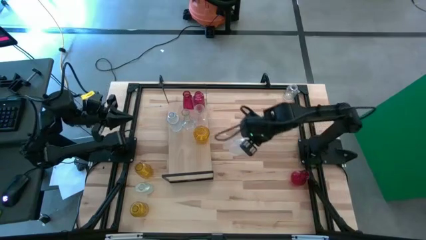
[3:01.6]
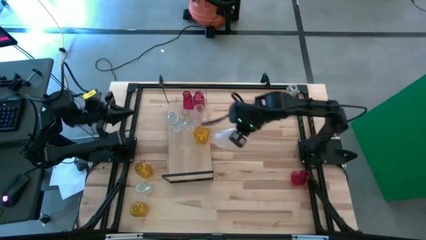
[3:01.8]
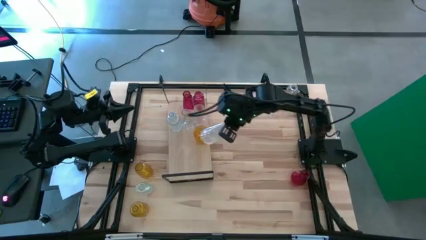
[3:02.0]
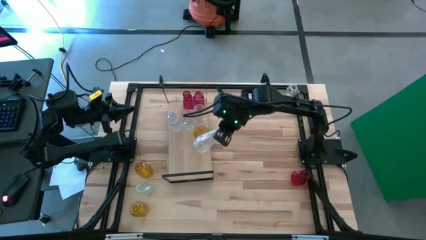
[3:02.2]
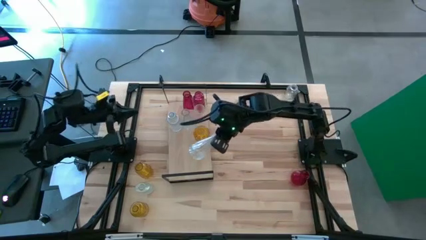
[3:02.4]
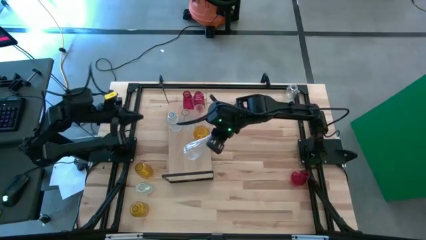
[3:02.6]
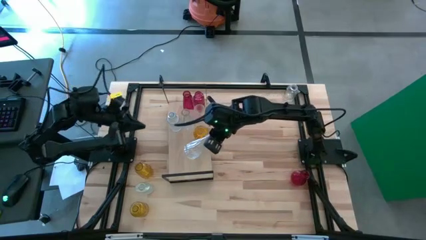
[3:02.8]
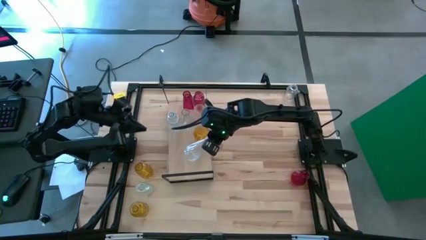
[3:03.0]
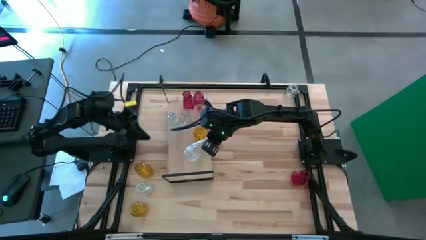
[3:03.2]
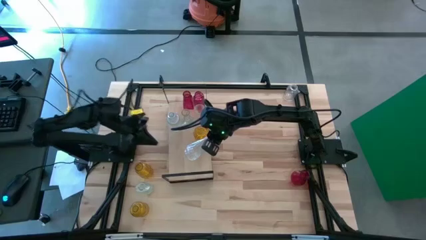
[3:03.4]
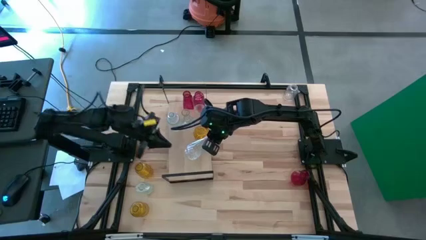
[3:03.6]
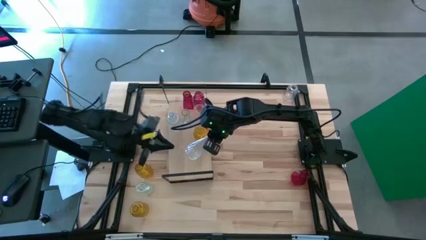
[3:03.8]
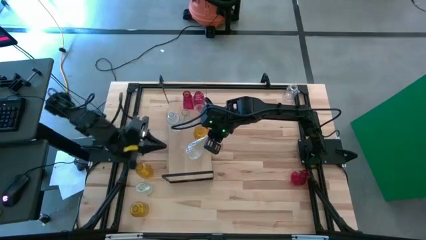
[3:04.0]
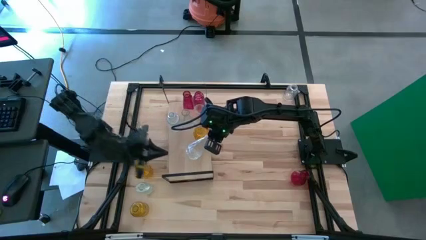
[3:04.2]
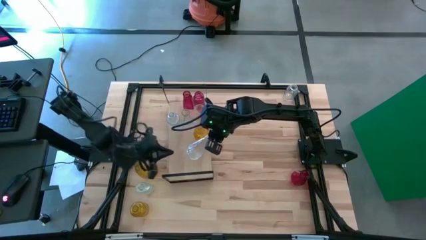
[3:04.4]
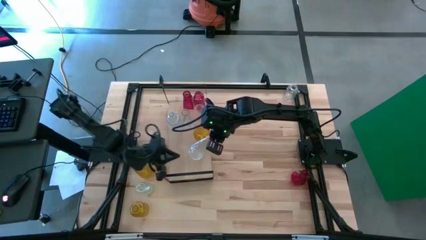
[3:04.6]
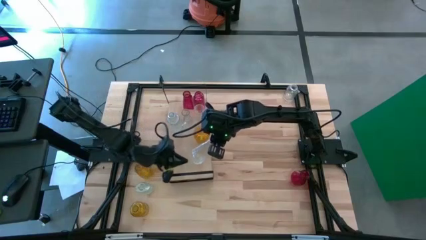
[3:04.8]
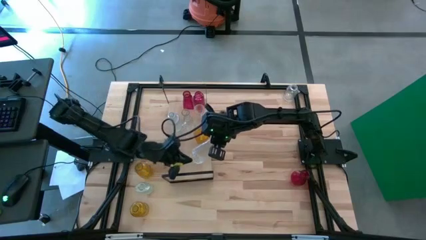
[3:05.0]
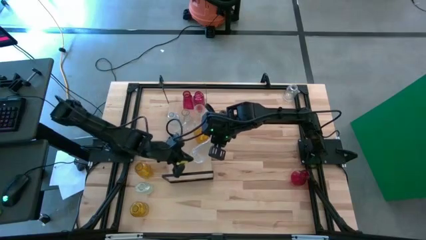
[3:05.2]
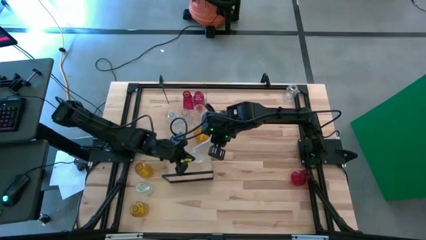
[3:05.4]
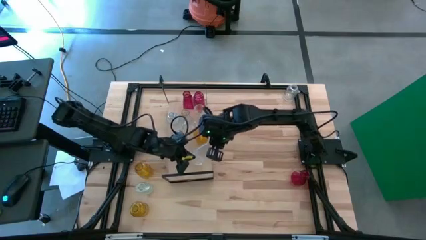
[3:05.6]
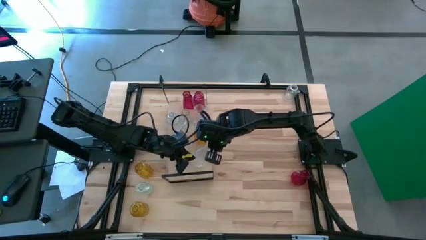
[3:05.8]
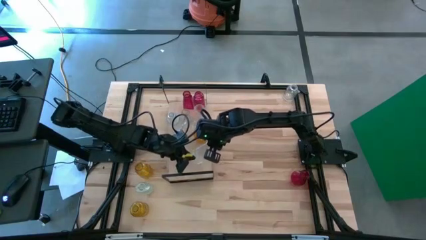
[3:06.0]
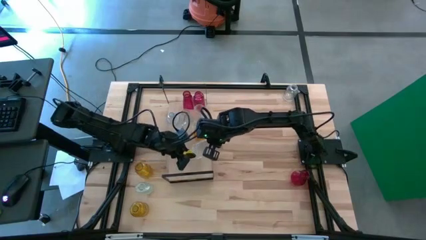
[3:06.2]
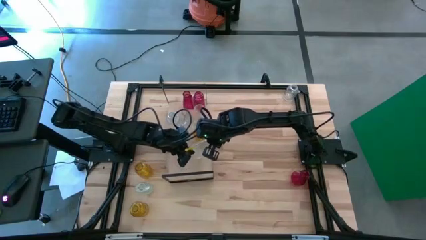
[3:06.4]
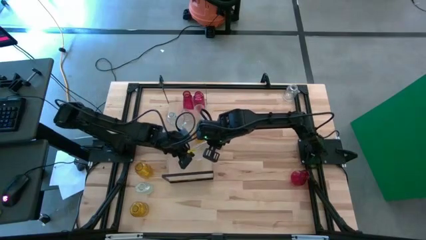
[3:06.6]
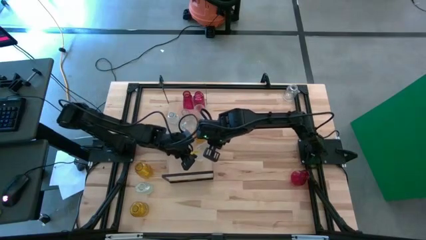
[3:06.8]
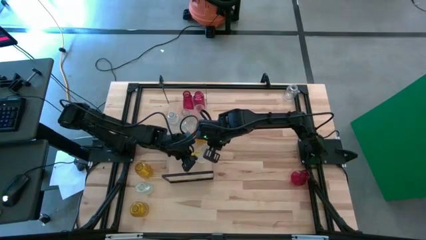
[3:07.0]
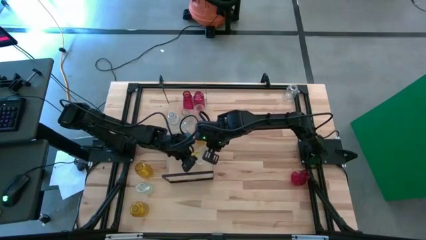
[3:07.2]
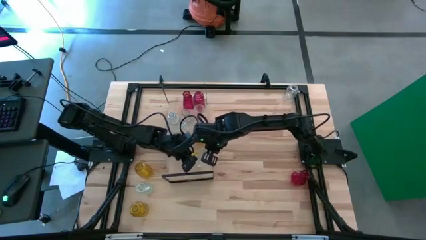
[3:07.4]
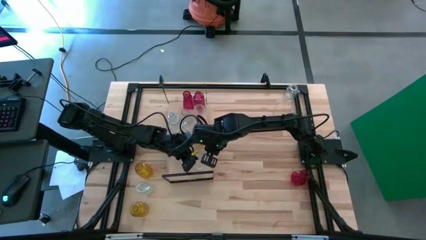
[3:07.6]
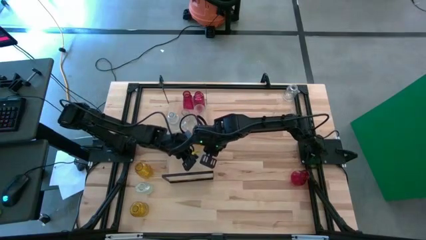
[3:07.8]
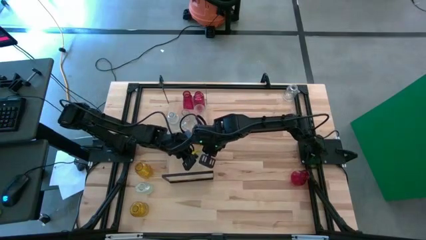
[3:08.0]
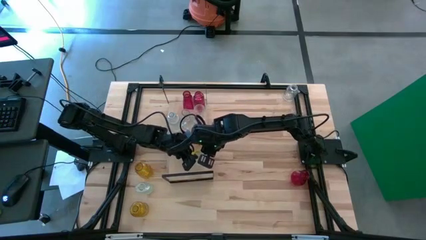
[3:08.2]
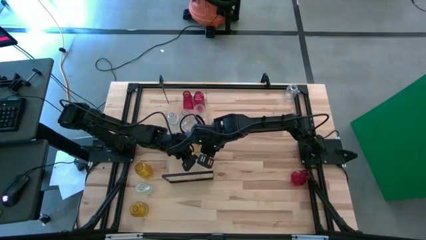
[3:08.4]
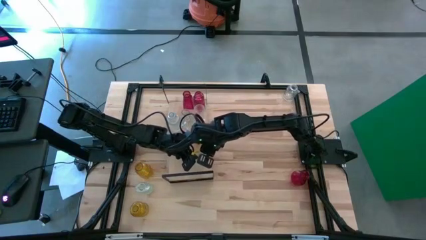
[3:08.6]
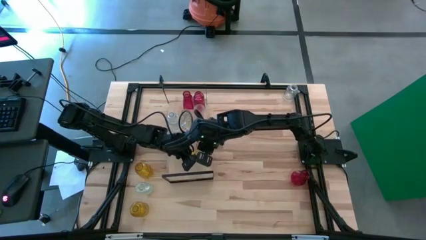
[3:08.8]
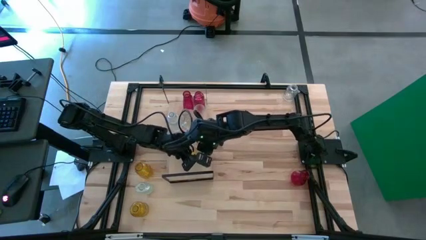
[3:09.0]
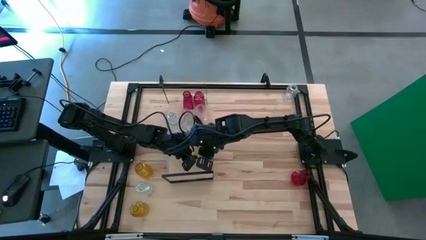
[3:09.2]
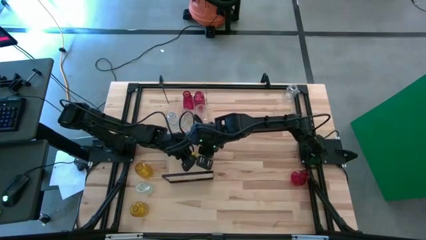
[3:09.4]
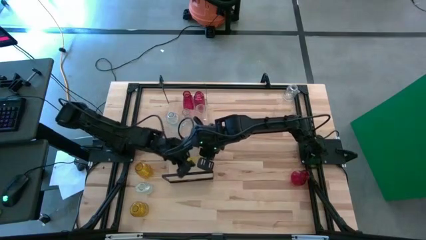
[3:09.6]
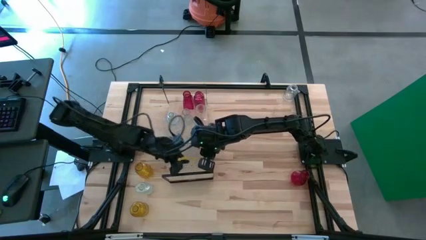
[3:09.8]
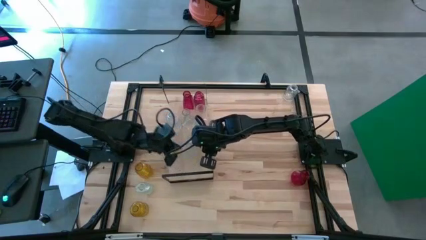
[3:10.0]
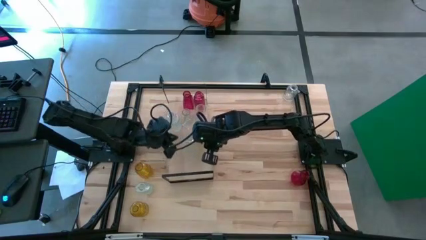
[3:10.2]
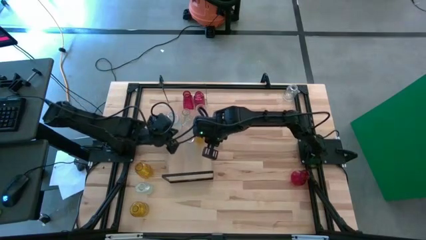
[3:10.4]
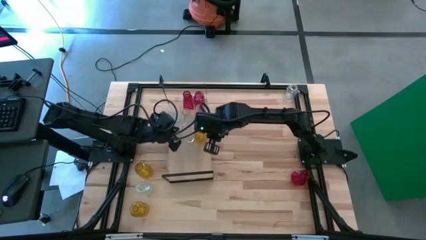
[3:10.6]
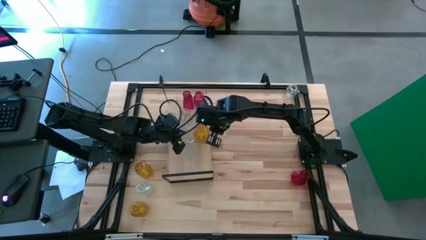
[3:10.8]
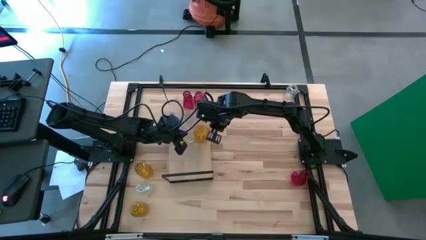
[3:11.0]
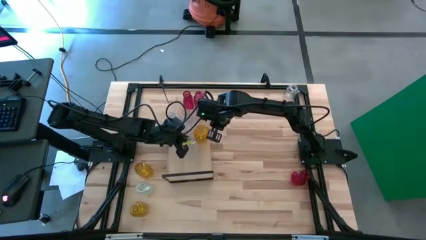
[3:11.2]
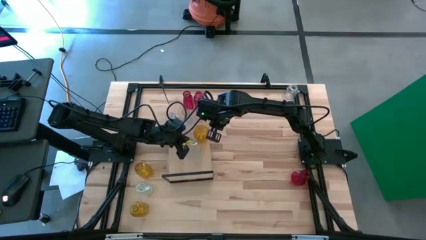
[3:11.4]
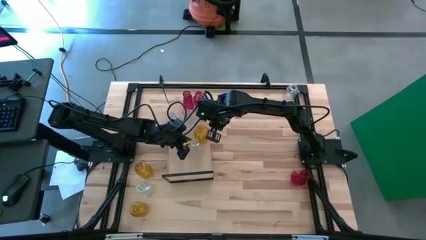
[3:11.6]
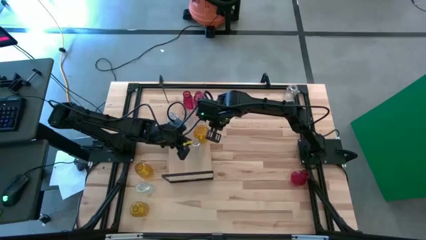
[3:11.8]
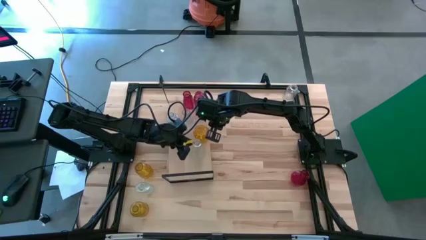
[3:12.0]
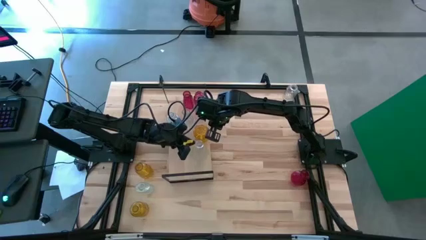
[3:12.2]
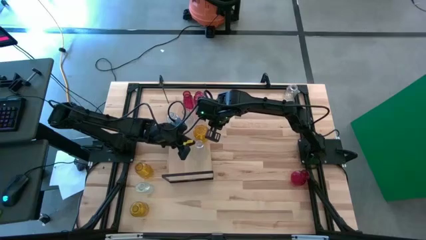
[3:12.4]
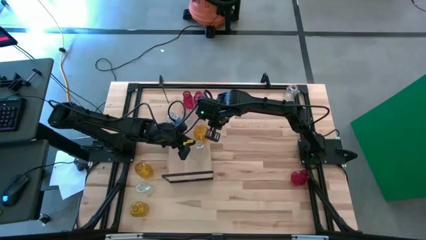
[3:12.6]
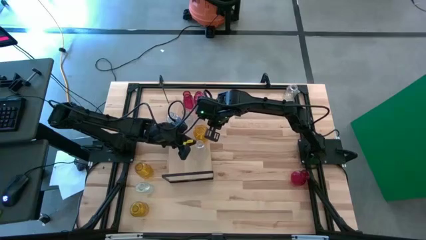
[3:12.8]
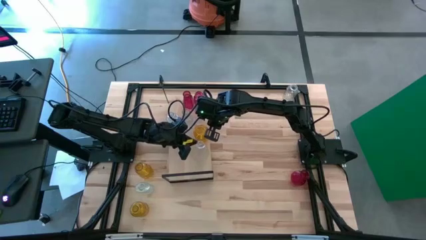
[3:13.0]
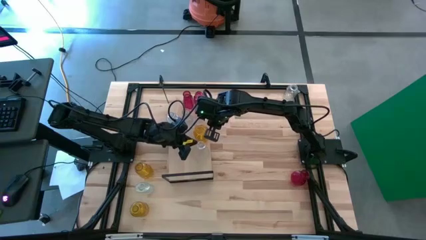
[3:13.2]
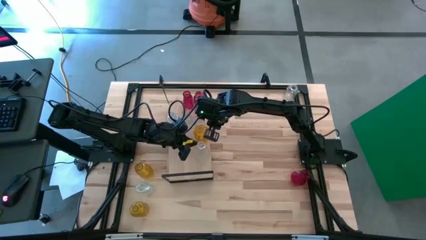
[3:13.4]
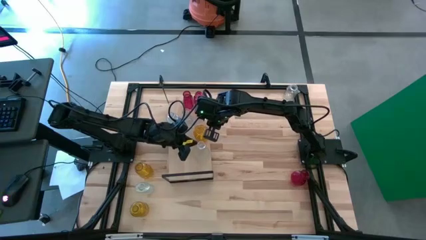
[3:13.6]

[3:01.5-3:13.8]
Task: sort vases onto shelf
Put the transparent vase on the shelf

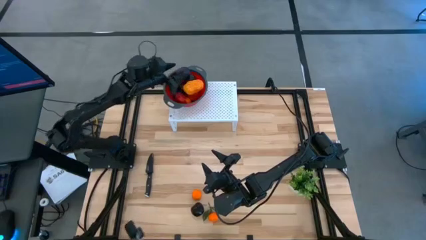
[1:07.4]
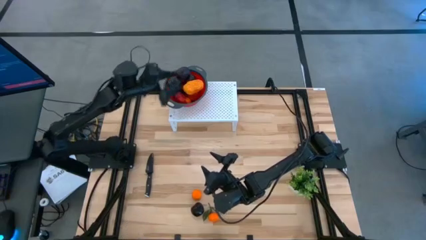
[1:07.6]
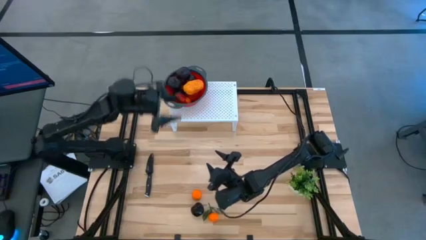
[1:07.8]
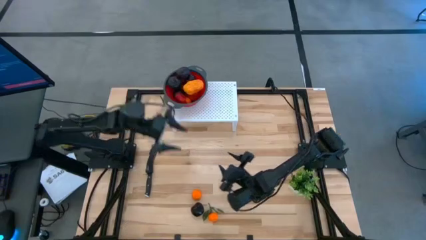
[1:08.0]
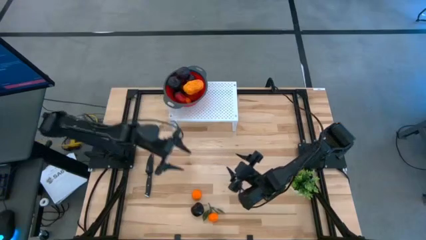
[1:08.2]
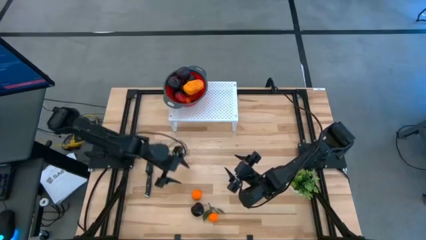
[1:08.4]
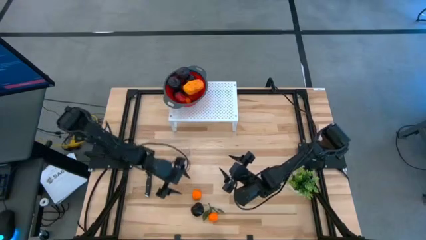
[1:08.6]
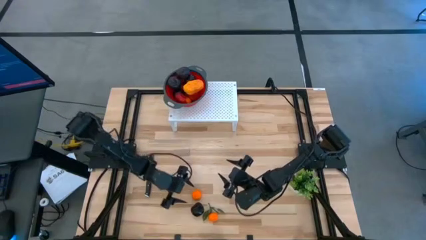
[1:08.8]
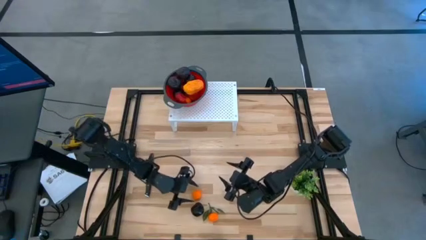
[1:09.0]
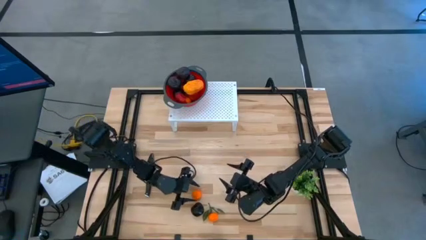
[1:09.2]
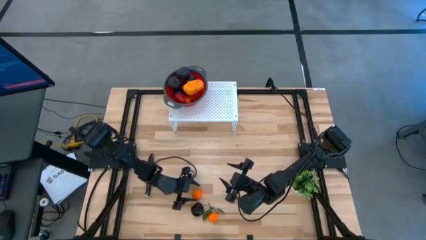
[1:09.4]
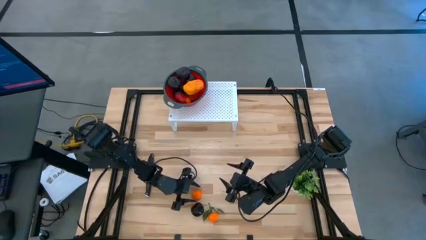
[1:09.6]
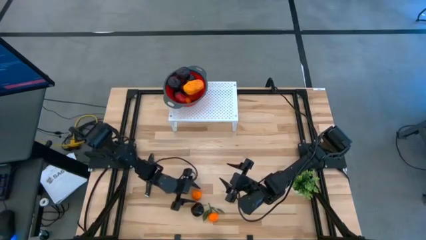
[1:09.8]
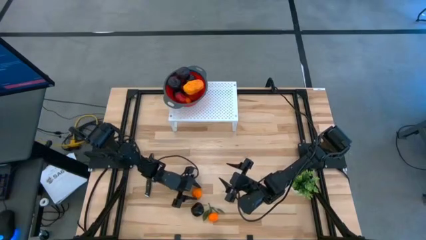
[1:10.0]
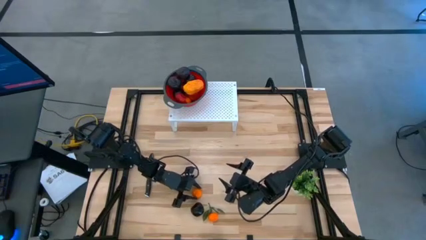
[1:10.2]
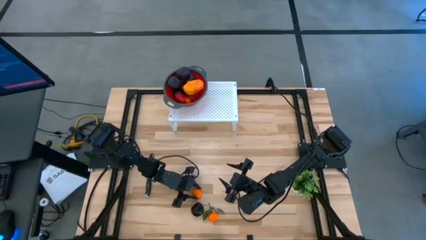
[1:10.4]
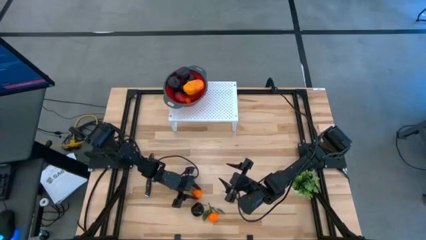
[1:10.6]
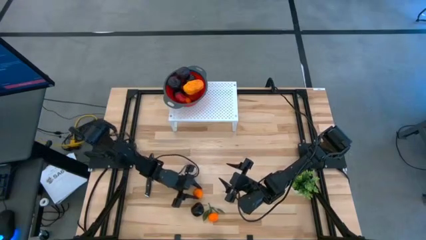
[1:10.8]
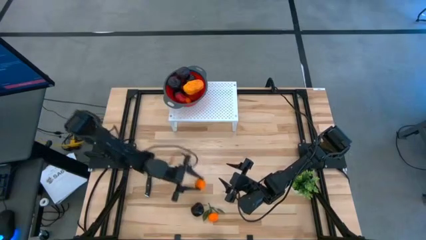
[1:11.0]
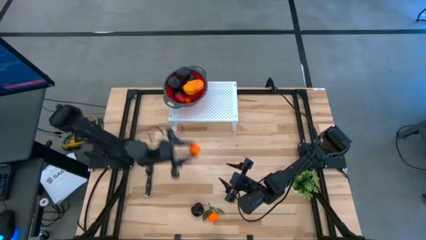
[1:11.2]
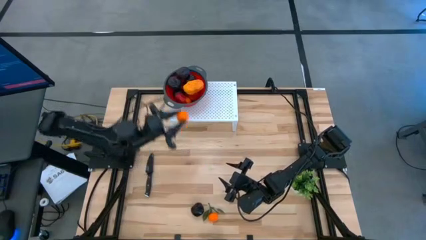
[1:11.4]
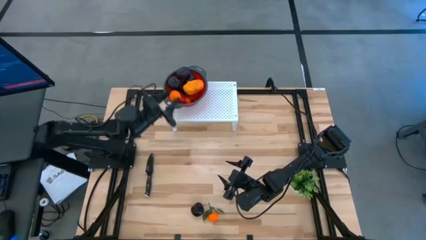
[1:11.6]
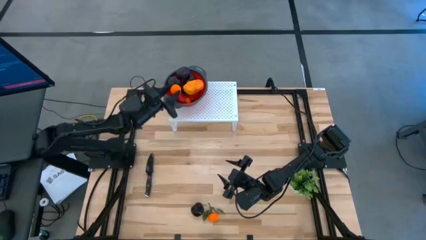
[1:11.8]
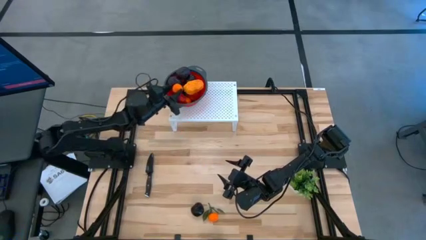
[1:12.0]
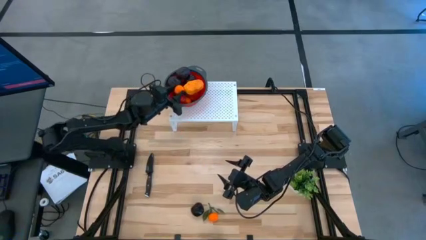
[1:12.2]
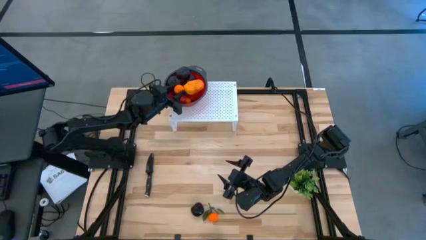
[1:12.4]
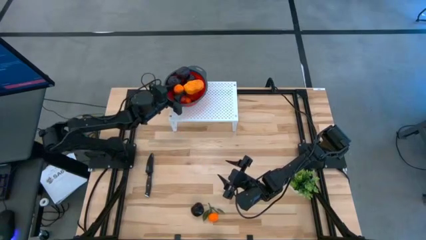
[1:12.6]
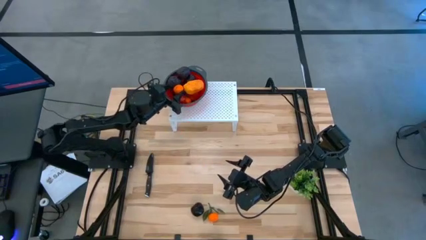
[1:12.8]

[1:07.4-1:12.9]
Task: Pick & Place Fruit
Put the orange into the red strainer bowl on the shelf
